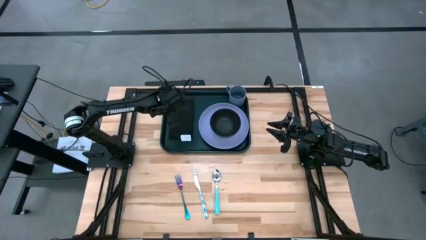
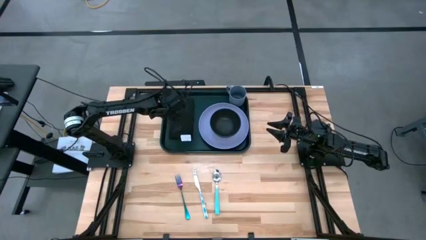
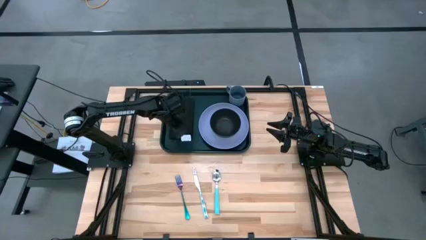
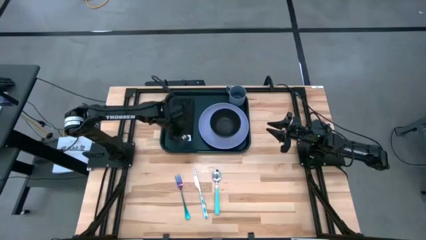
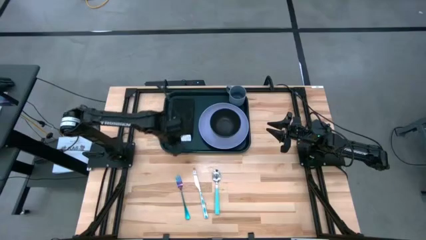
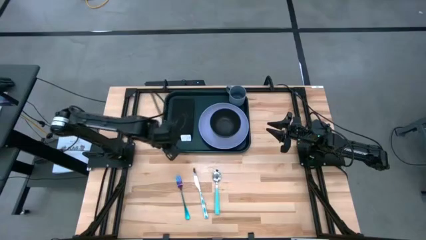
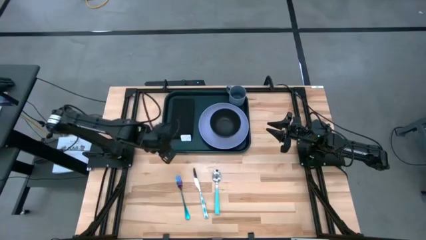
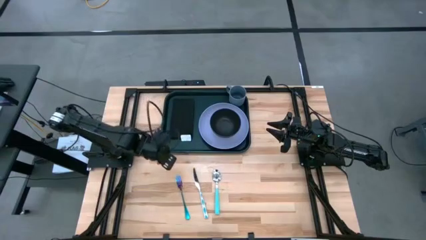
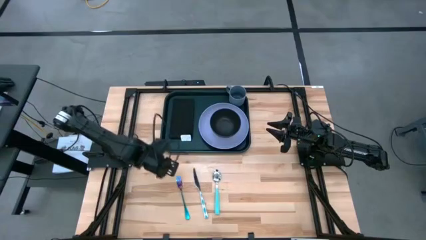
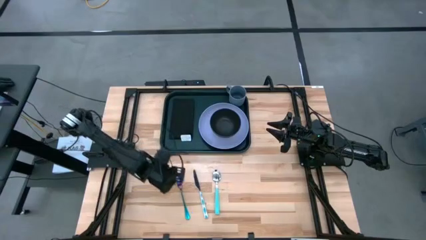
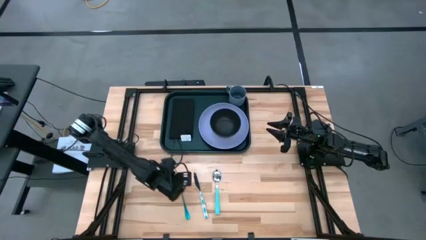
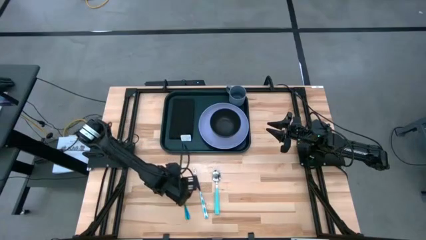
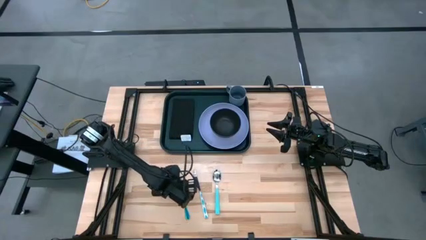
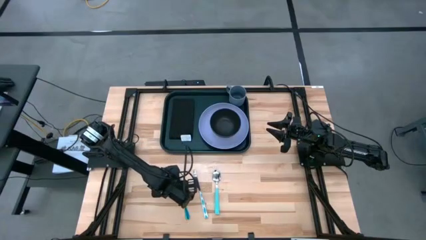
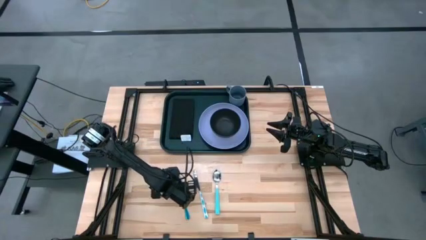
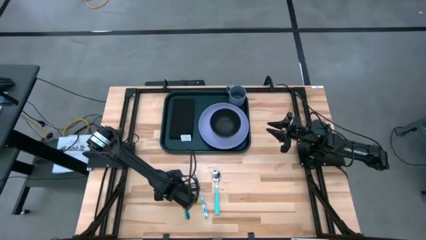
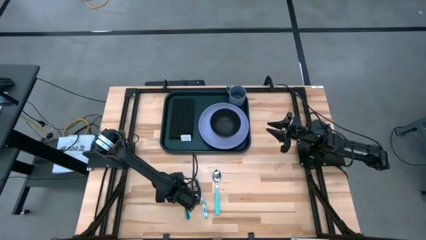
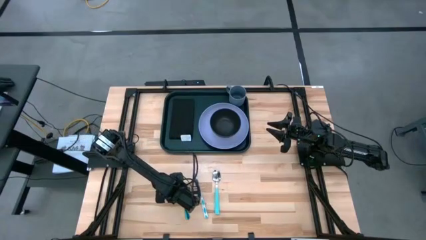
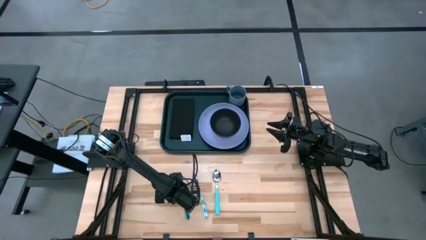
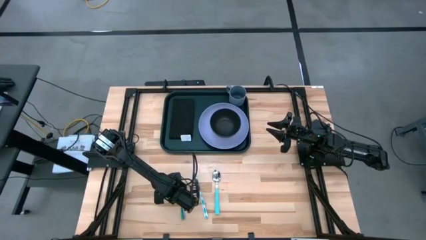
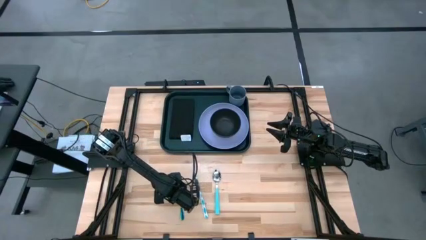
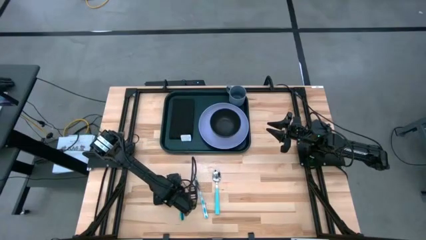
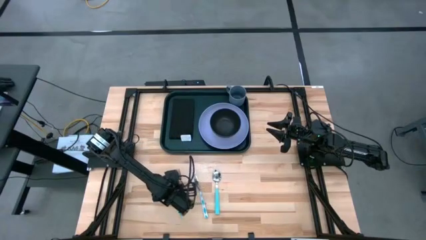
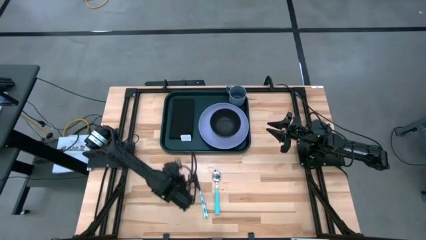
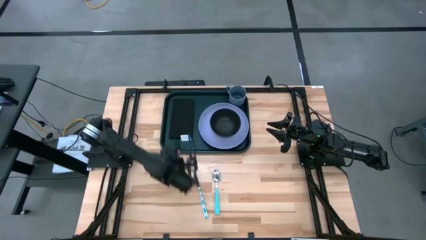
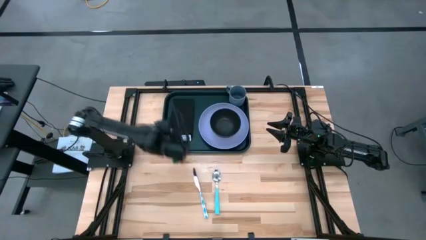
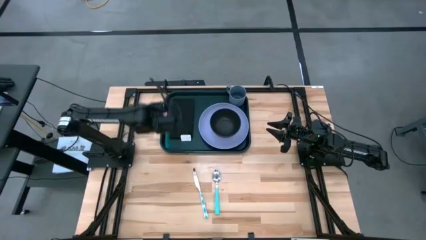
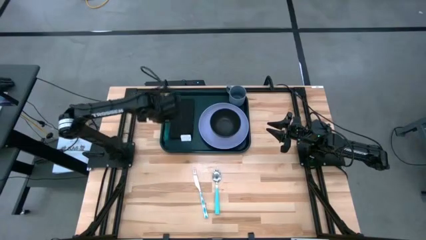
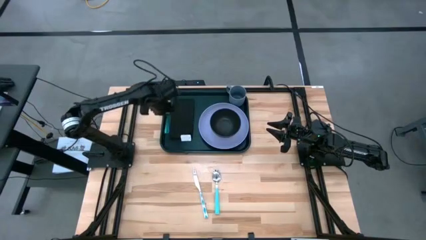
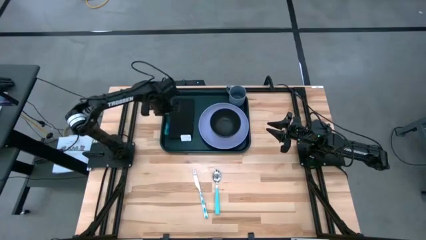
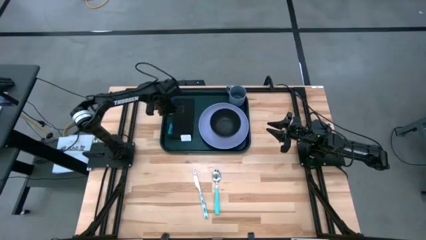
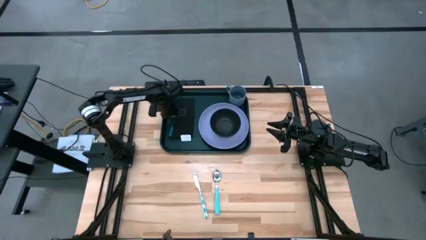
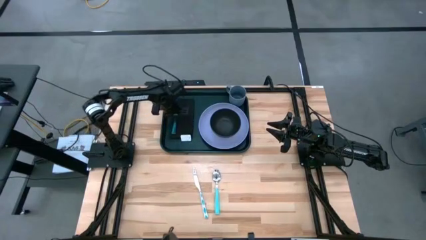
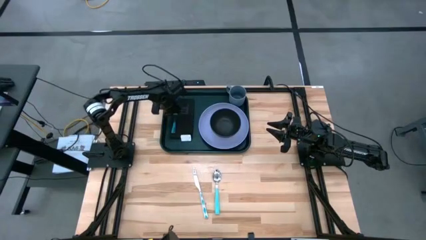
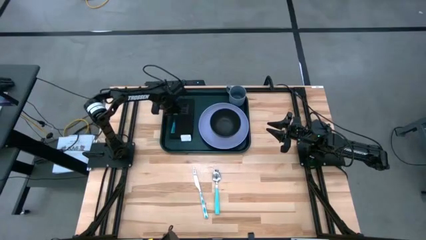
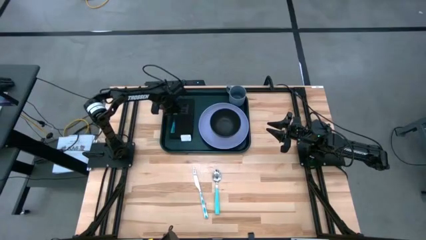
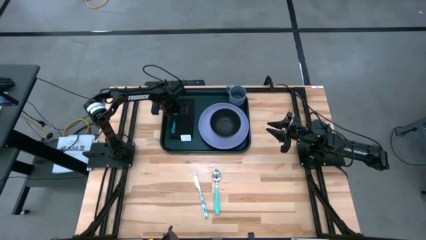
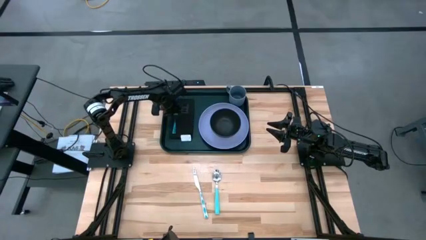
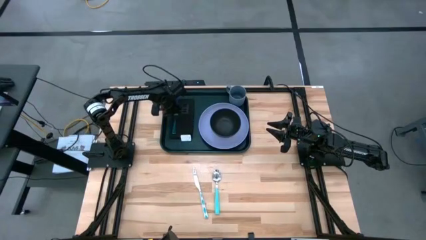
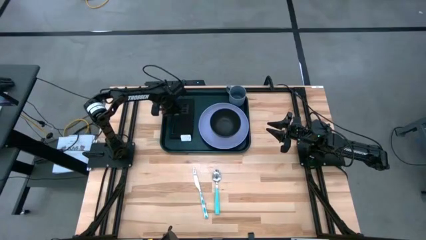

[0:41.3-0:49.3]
Task: Set up tray
Put the purple fork on the black napkin

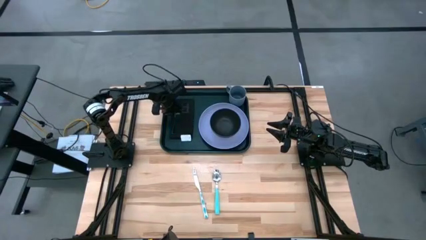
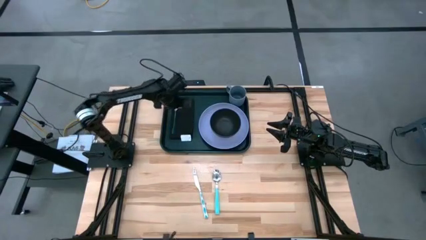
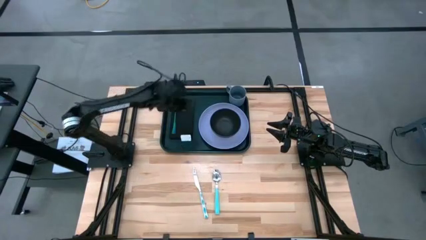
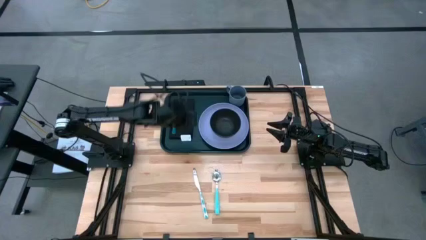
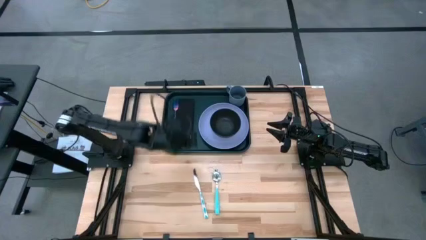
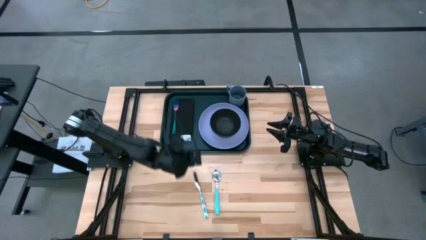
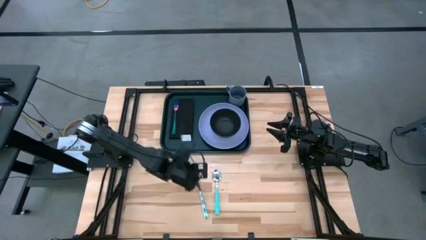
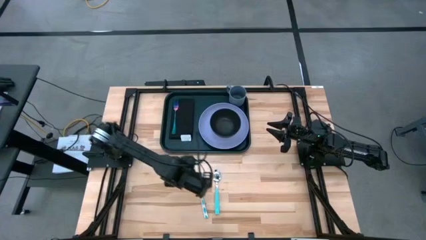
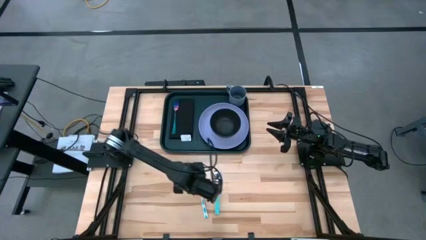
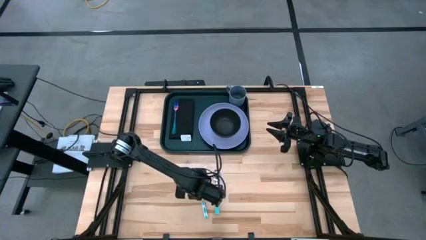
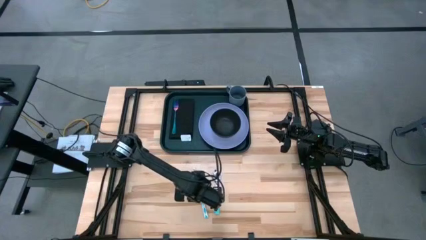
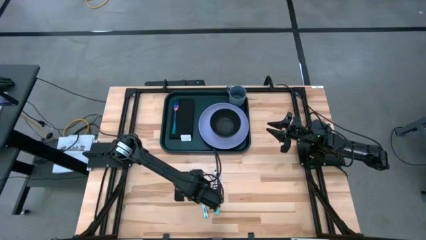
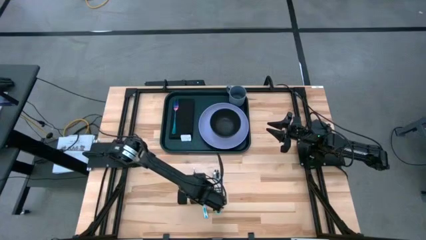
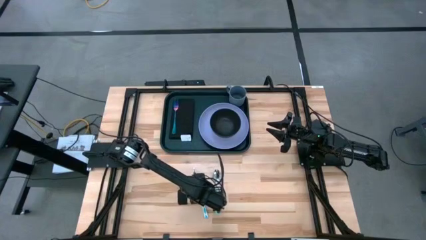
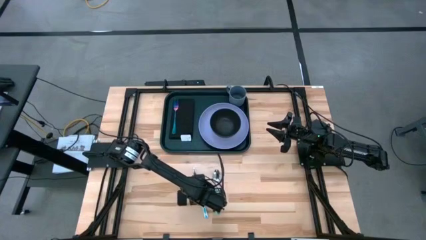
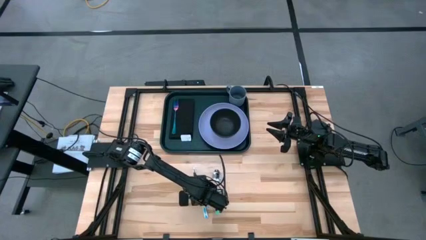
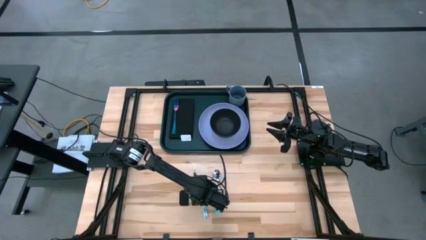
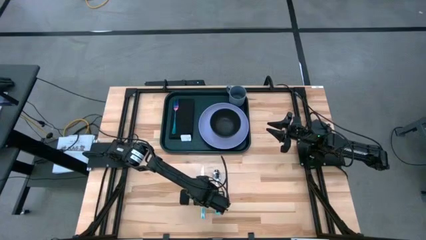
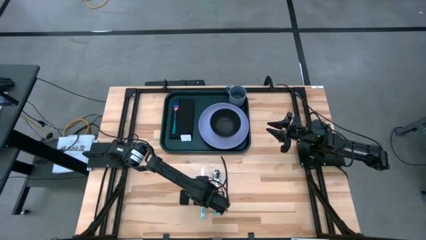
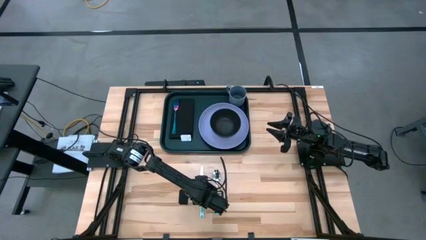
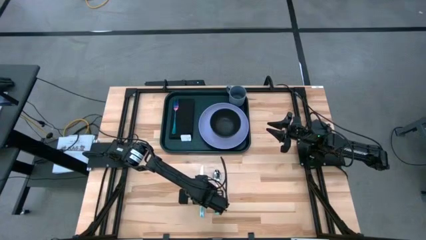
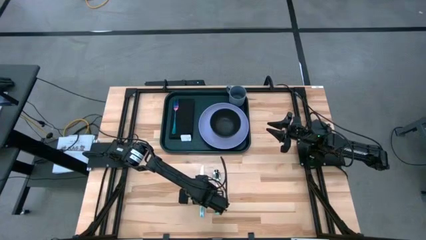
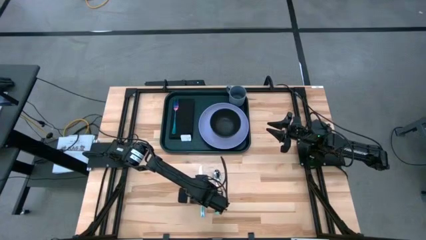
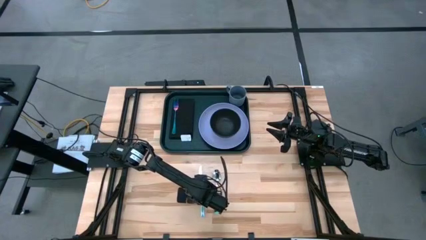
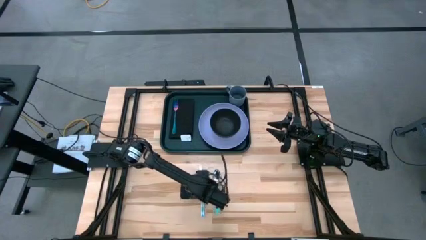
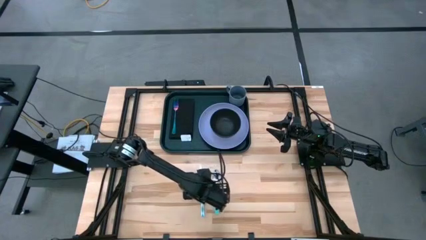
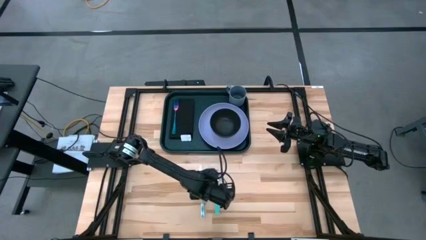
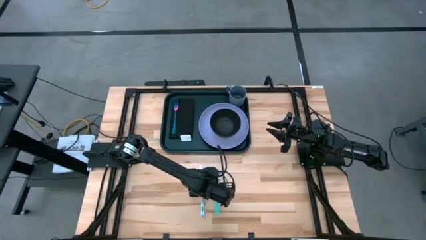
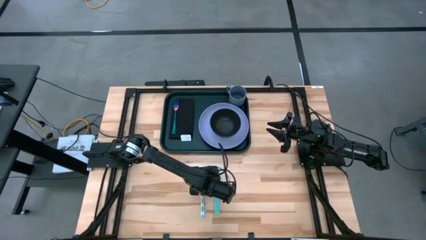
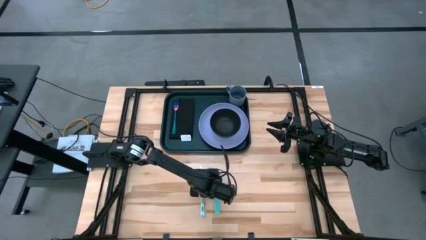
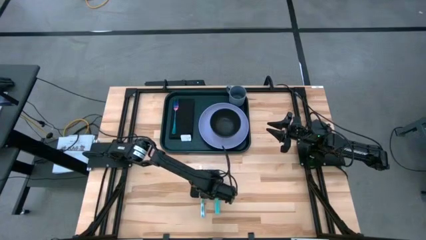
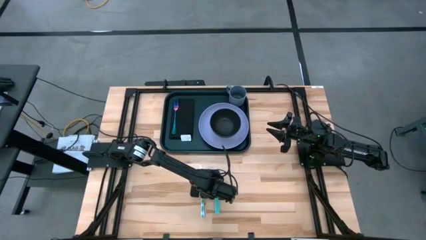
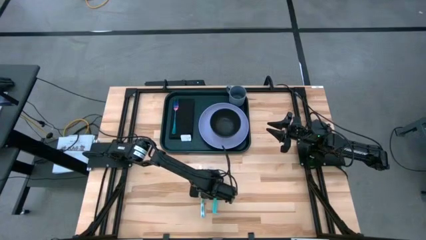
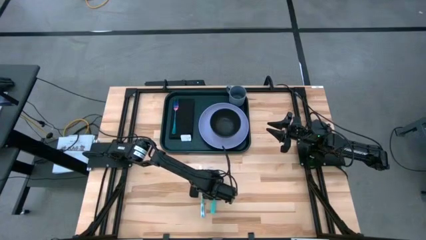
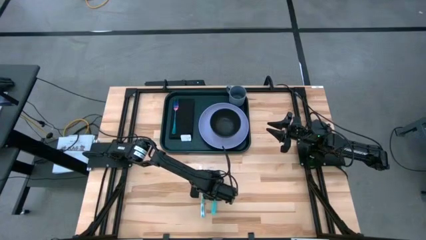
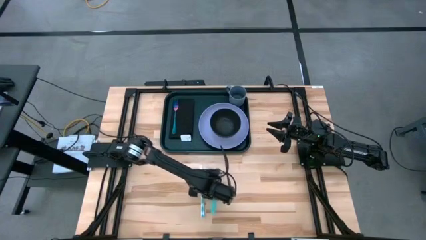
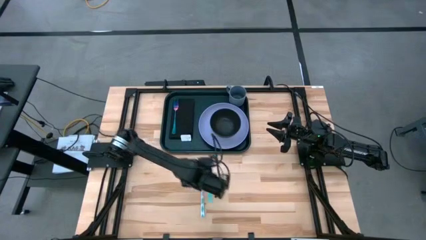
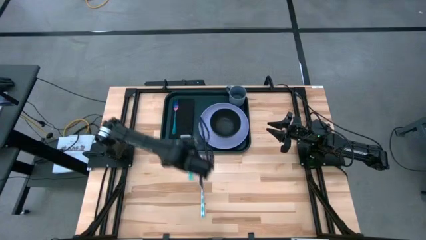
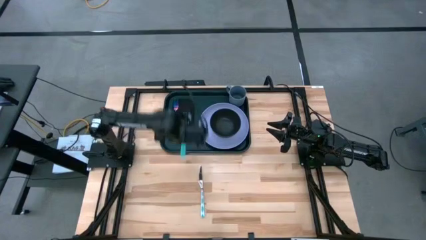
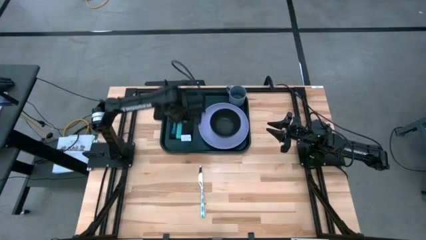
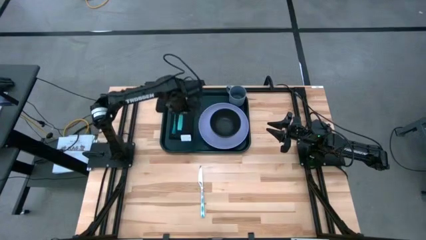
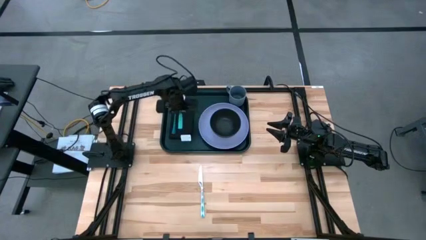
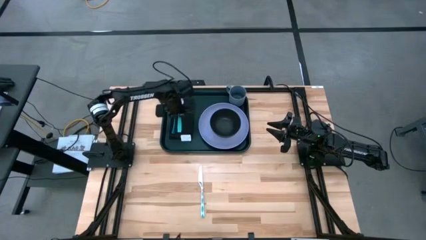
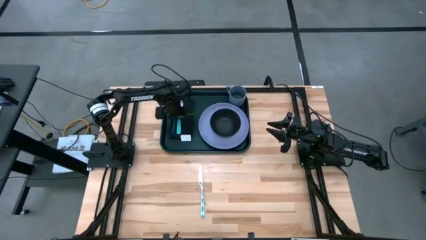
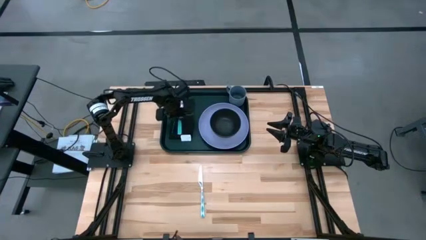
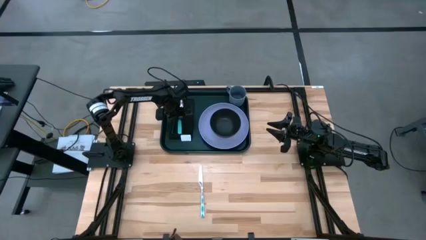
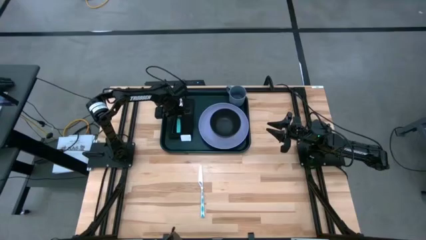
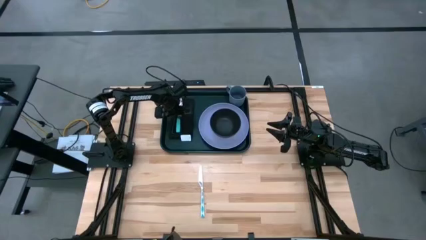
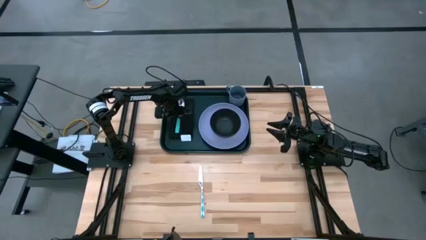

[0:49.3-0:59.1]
Put the green spoon to the right of the purple fork on the black napkin
